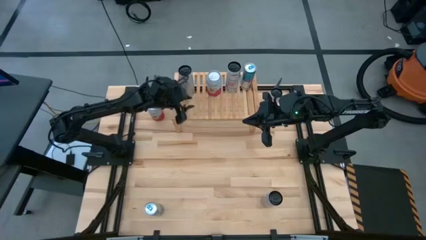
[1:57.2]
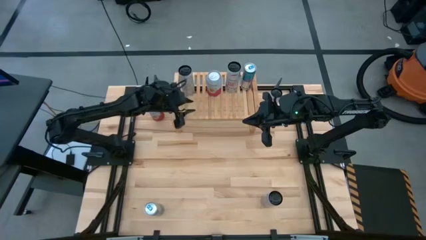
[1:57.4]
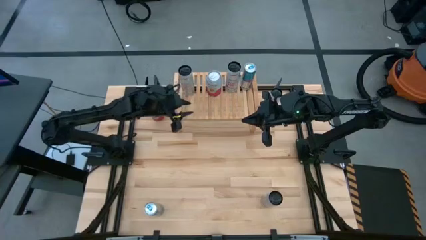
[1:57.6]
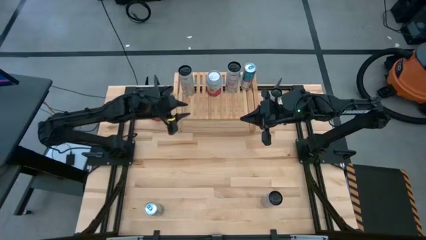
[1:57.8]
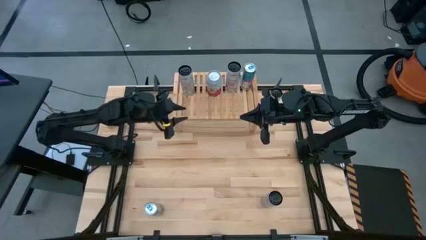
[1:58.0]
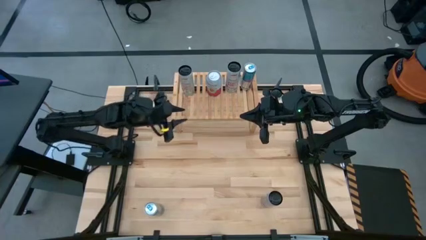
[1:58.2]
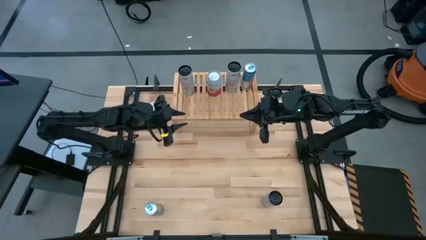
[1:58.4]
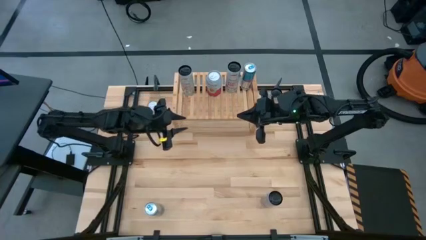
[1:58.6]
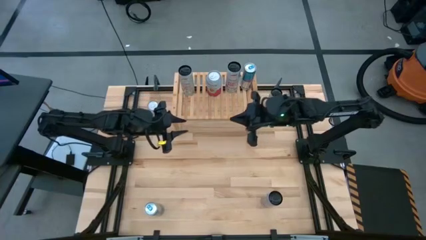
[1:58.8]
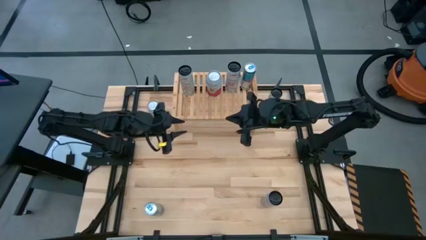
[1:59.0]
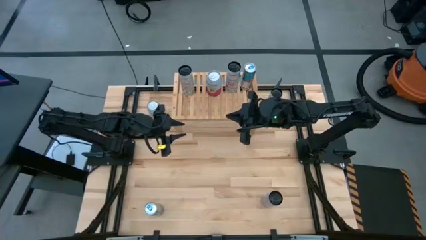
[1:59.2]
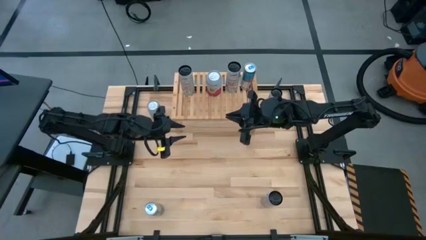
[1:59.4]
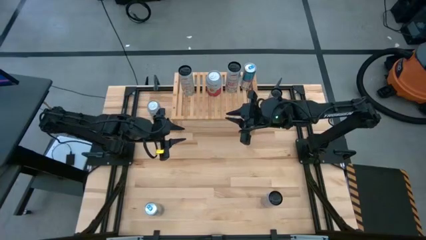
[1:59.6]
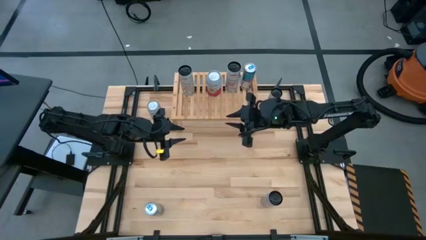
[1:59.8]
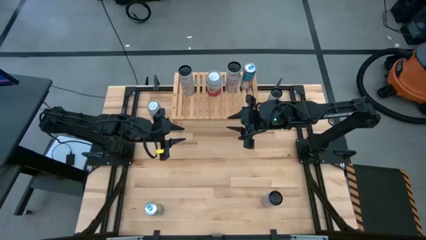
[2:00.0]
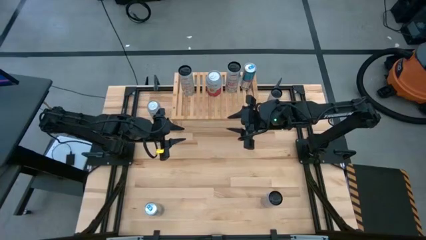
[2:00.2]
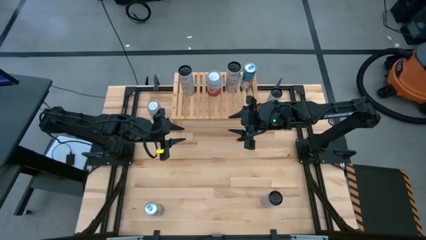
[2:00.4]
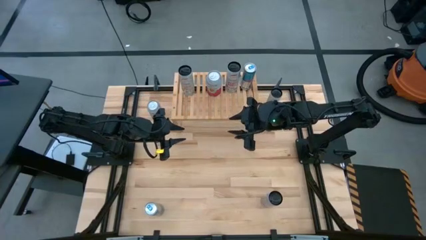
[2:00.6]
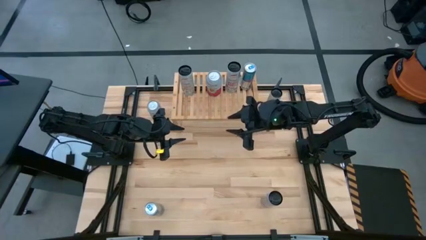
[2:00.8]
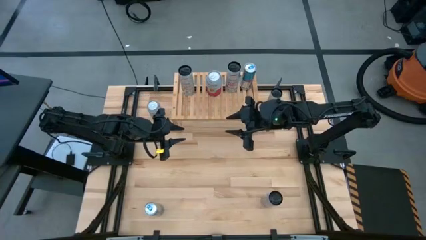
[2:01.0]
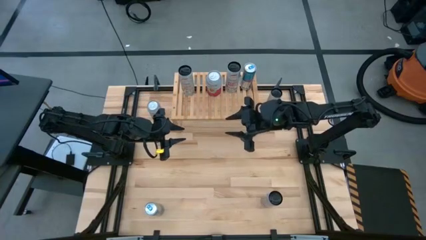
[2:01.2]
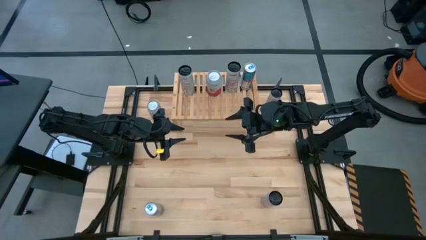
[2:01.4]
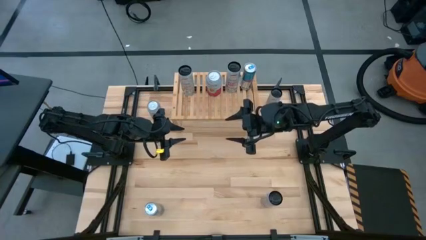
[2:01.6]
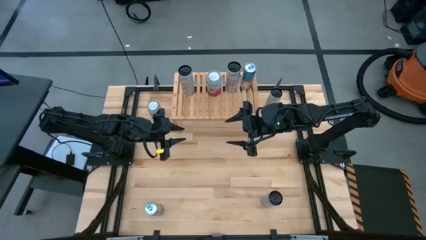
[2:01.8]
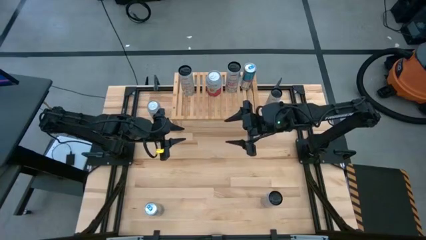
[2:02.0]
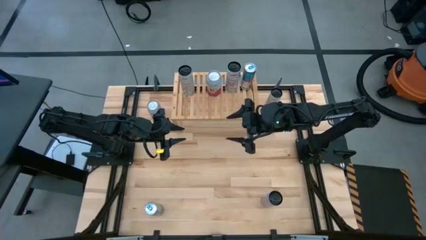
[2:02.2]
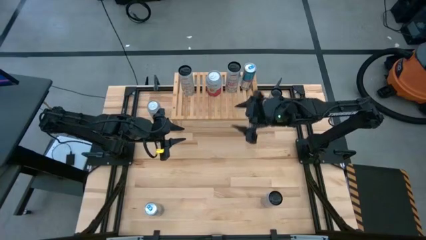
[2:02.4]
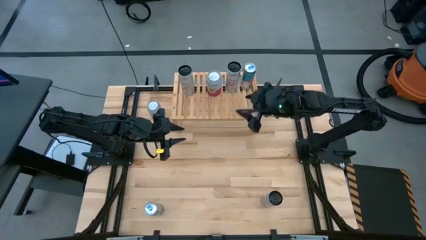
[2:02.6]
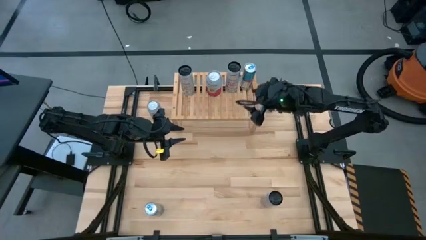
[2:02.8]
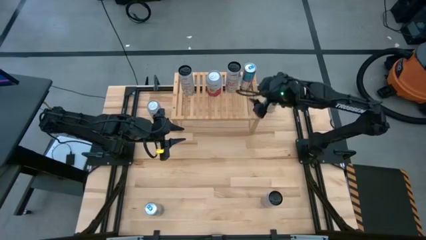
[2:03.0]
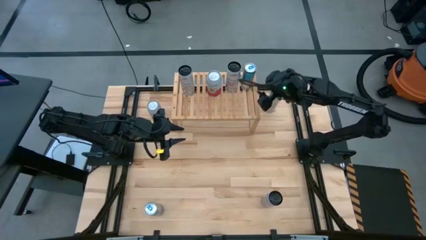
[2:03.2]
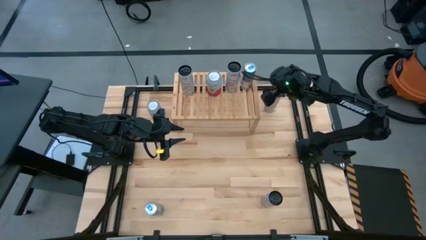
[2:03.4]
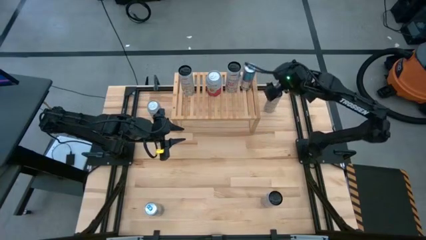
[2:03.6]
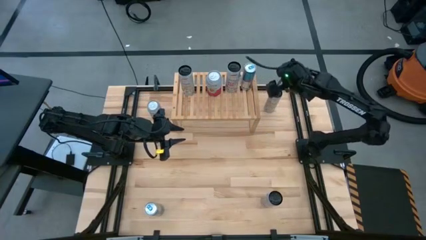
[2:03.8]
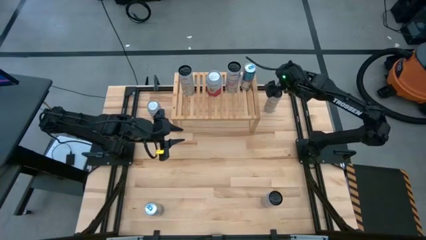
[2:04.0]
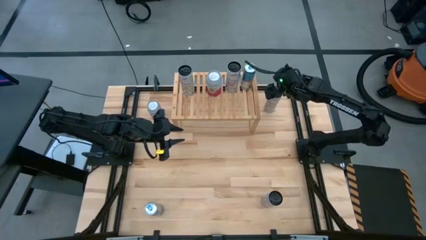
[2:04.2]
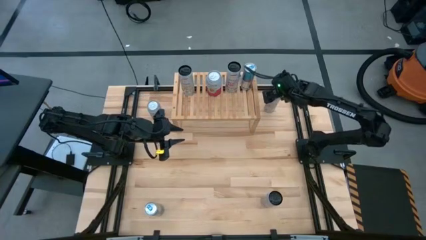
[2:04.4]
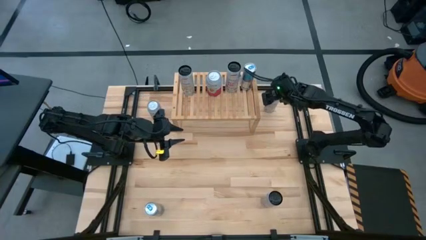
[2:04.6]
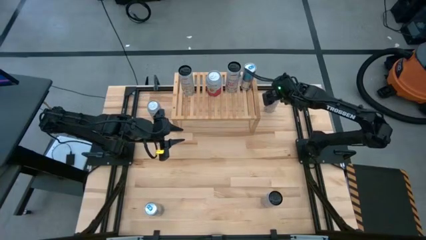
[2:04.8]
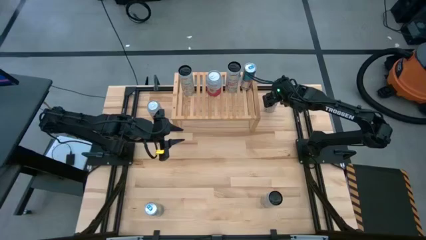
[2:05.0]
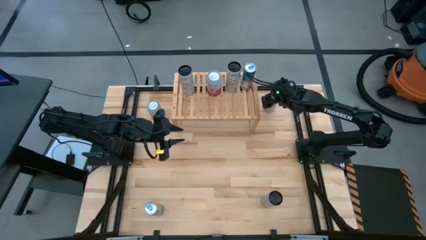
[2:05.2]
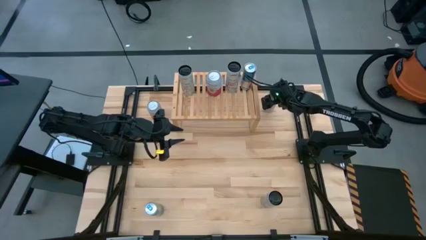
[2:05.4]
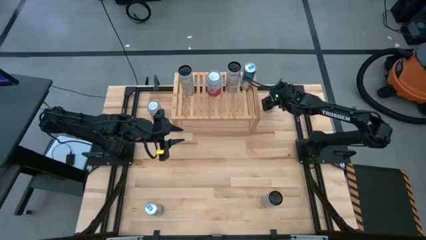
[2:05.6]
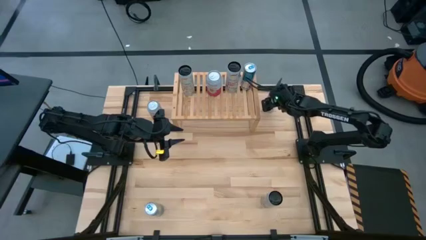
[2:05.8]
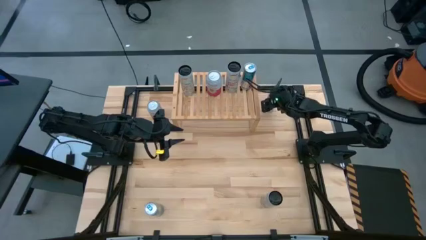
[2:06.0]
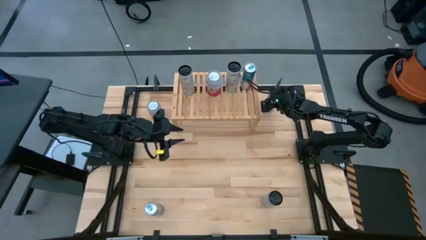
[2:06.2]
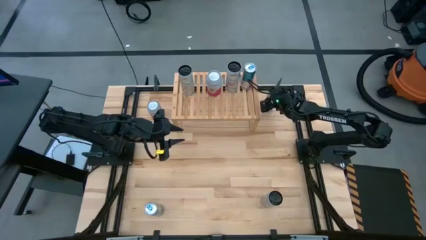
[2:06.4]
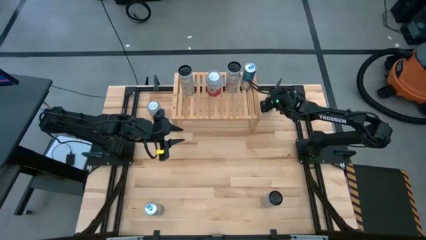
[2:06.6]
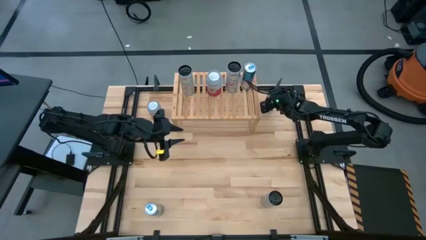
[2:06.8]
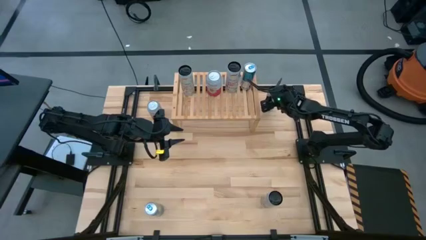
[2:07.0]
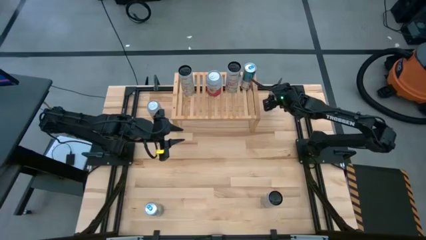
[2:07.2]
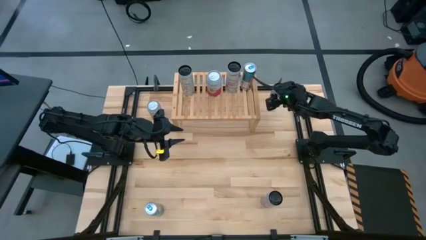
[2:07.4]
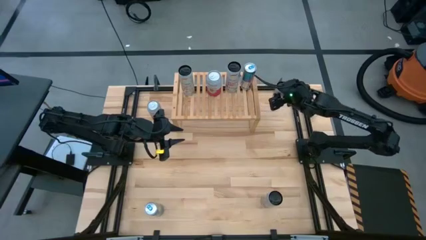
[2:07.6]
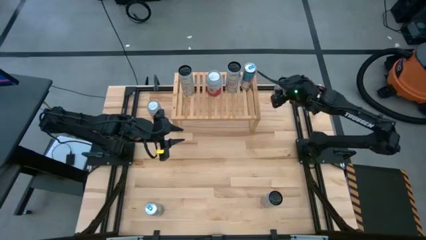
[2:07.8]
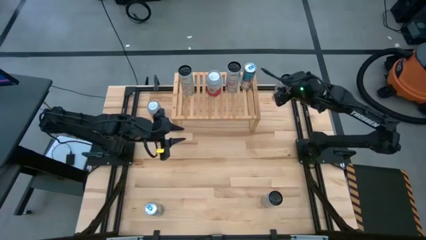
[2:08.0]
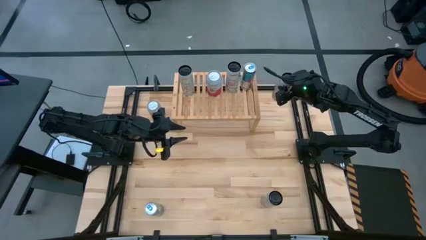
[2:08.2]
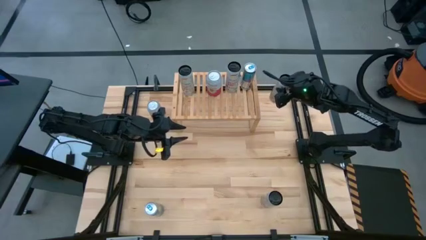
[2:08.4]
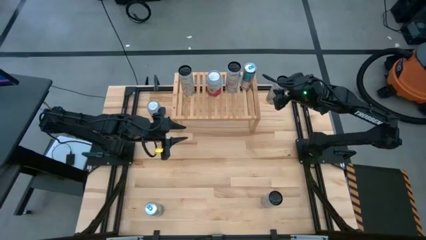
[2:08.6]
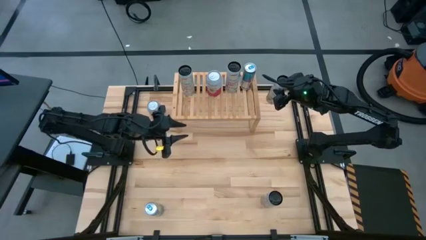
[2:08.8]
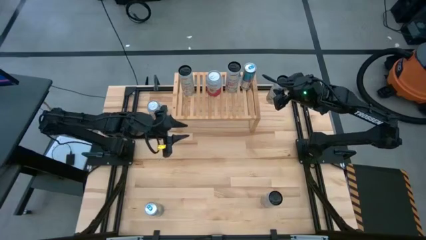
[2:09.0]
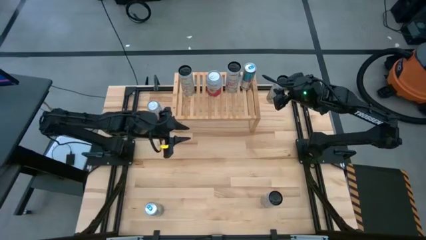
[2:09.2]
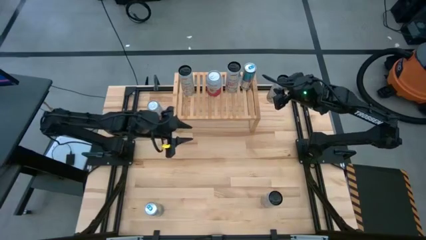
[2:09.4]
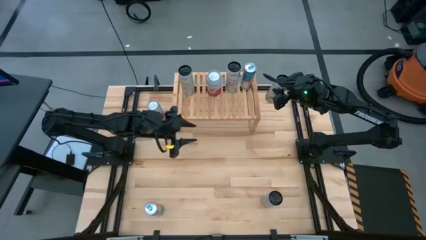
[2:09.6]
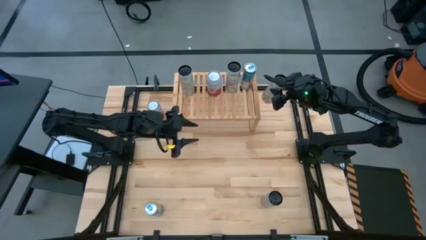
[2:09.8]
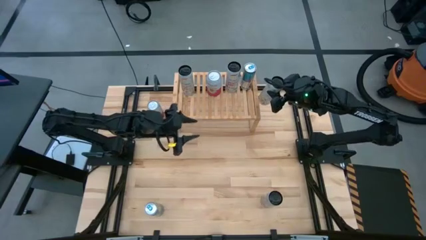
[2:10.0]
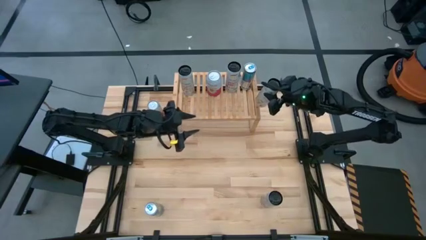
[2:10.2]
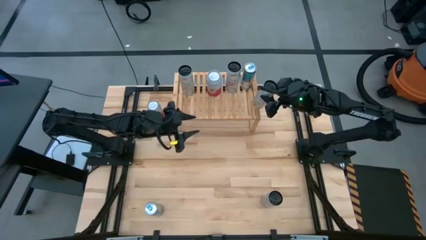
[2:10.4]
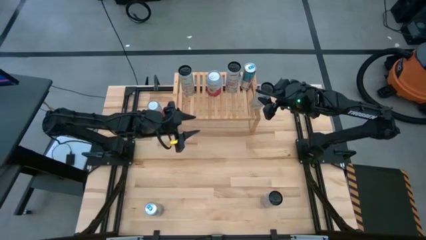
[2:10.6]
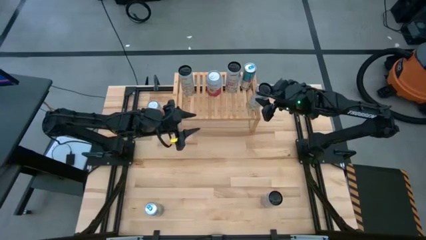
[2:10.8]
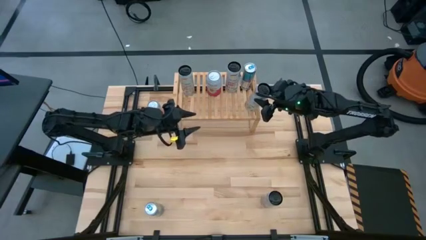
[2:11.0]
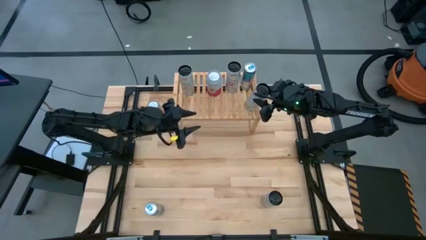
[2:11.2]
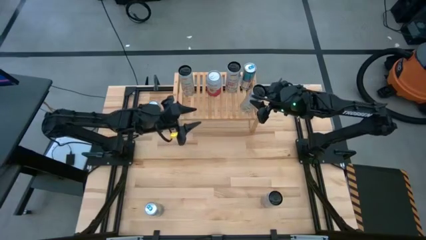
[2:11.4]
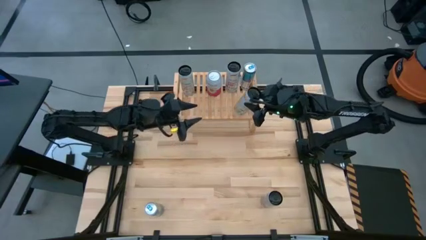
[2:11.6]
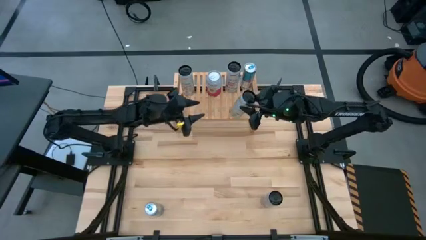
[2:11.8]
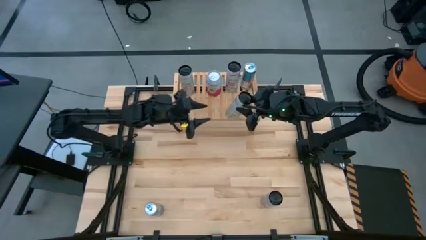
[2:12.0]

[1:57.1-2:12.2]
Task: Place canned beverage on shelf
Put the white yellow soda can on the shelf aligned with the other white yellow soda can
